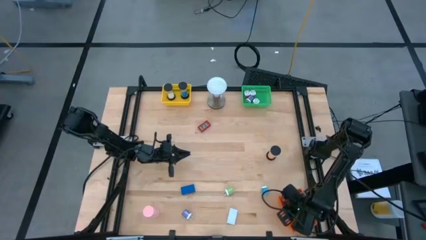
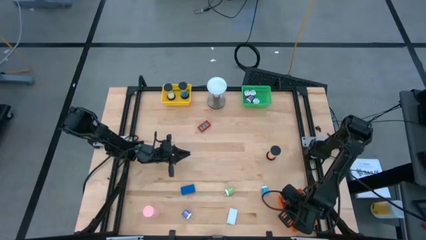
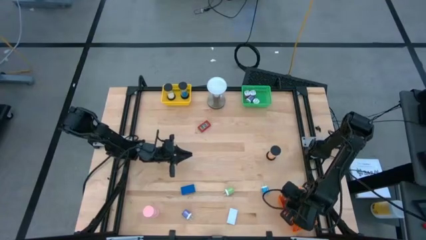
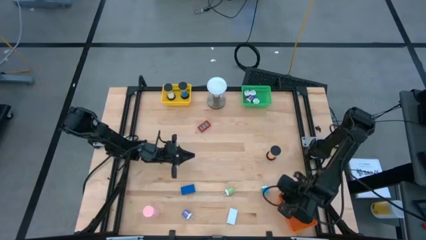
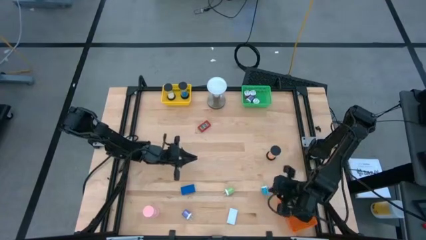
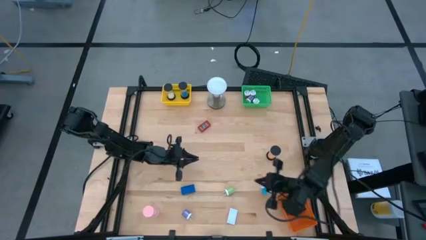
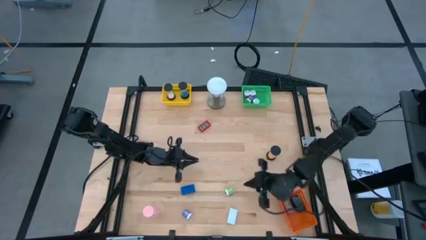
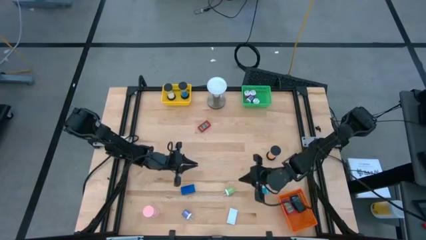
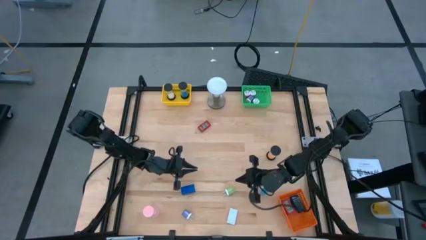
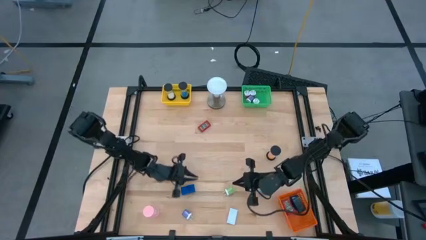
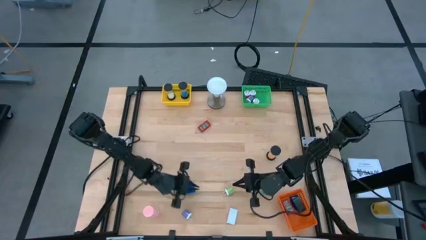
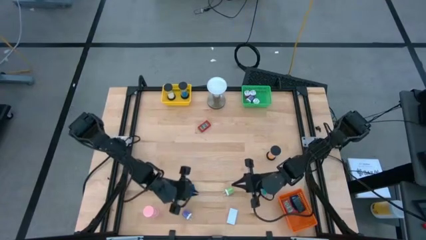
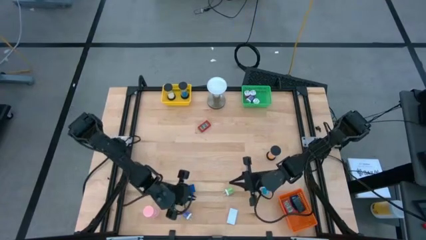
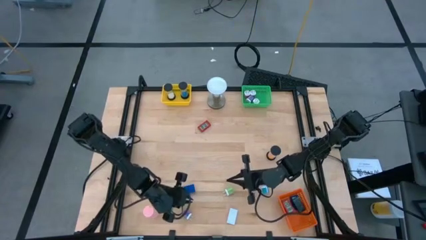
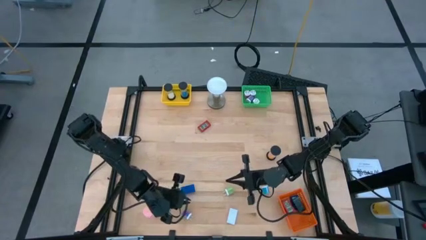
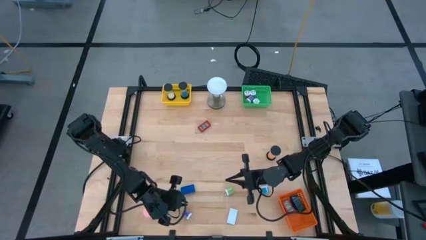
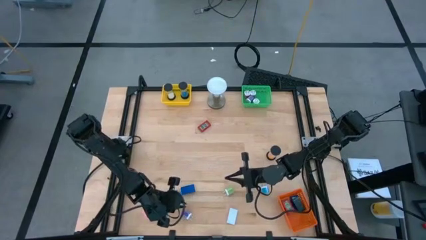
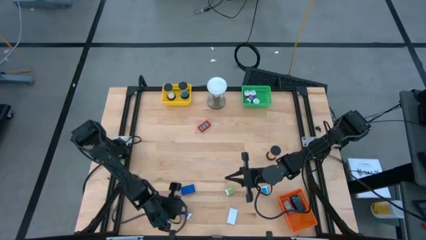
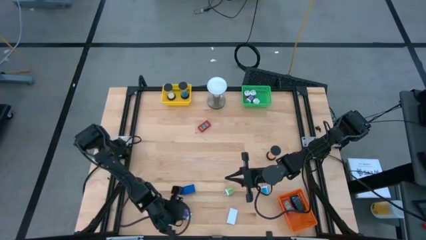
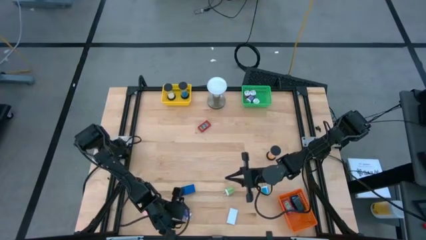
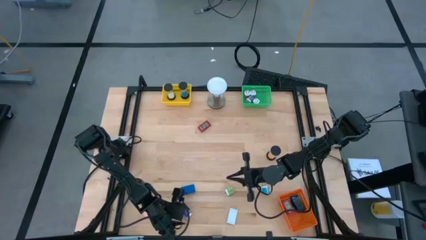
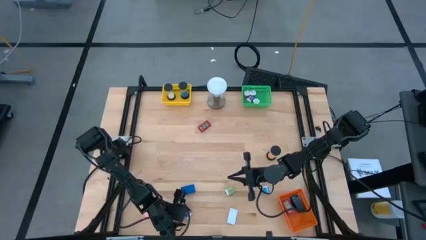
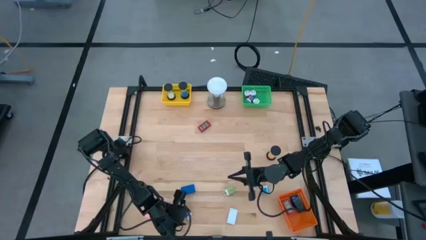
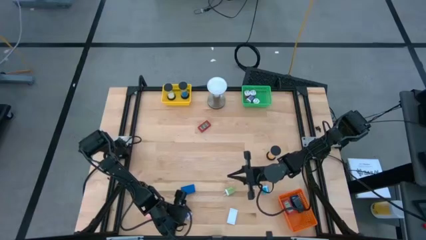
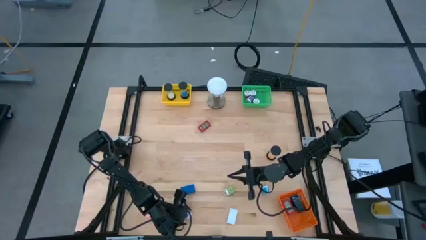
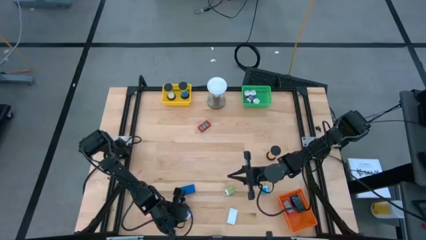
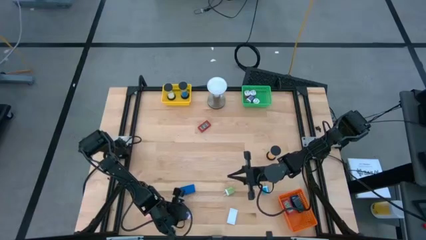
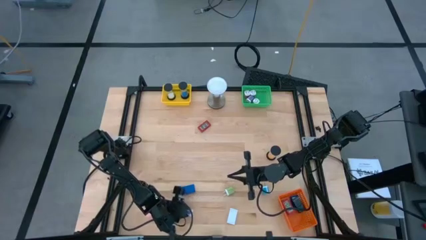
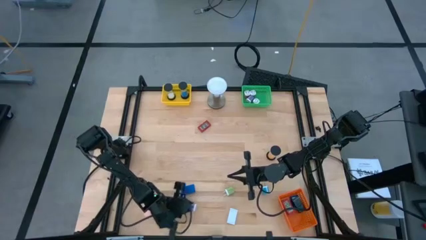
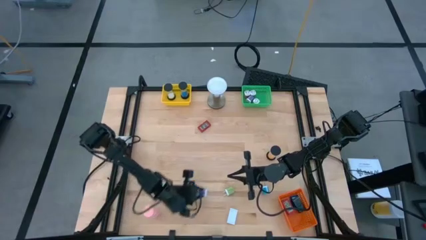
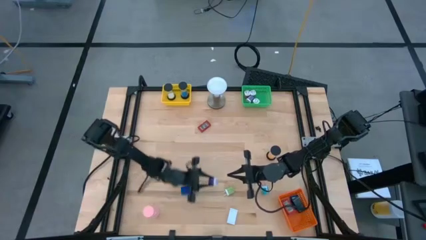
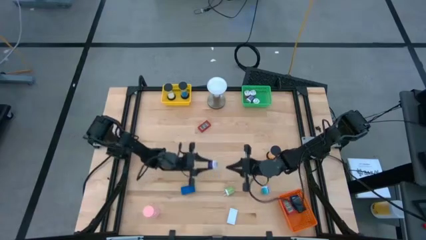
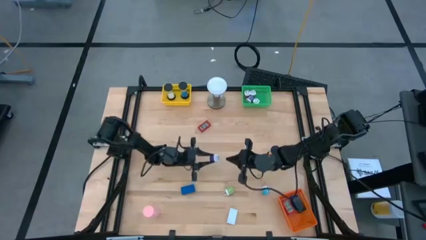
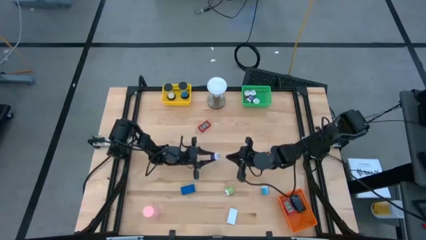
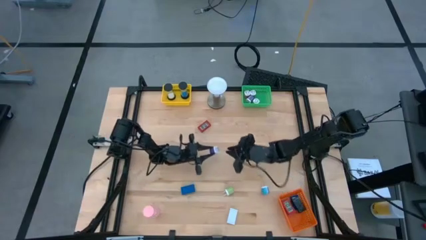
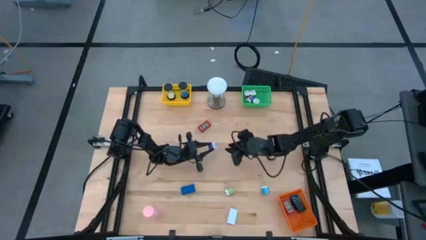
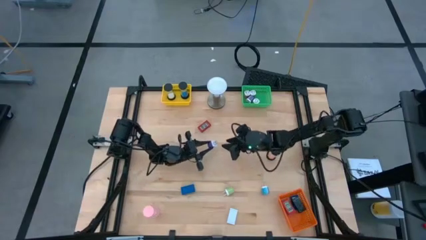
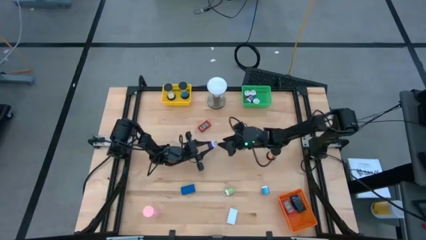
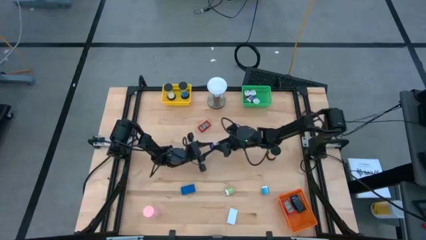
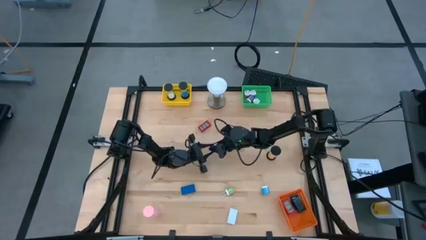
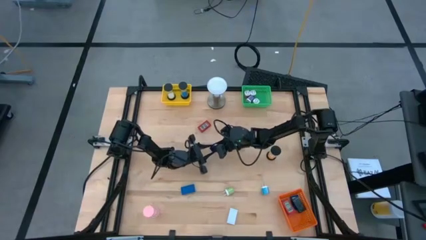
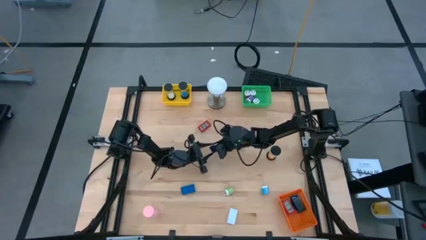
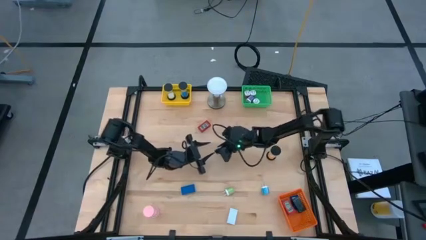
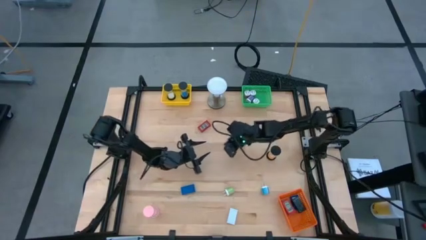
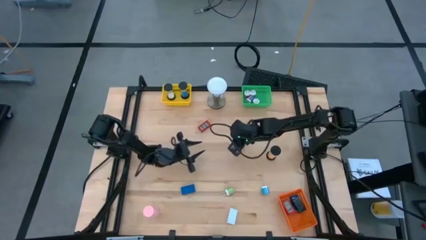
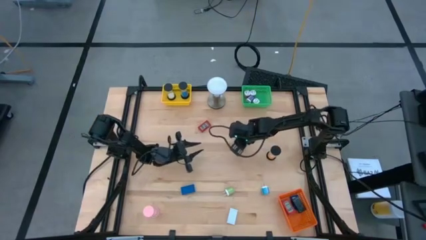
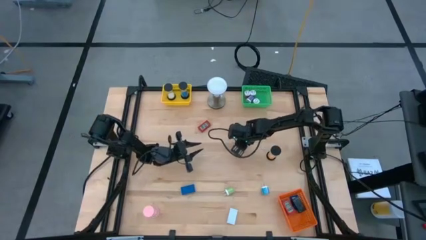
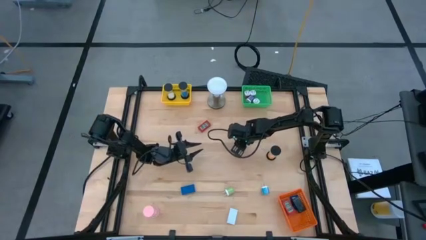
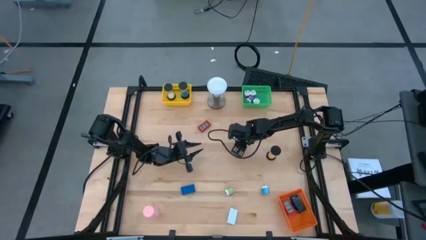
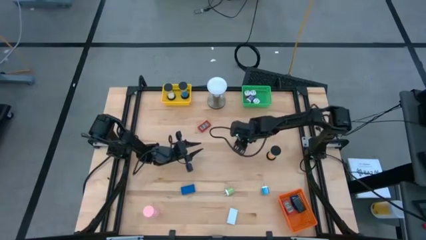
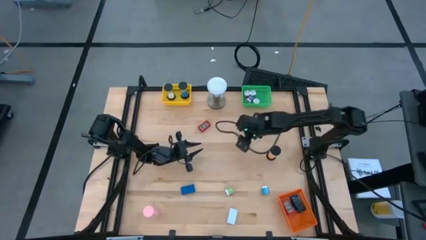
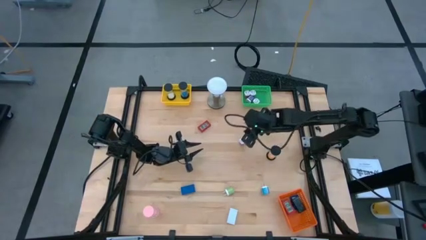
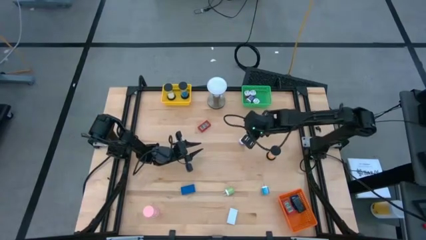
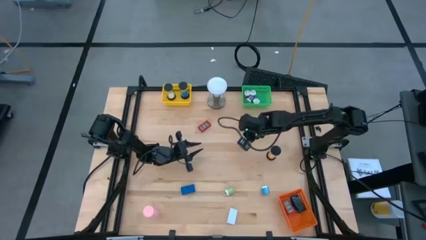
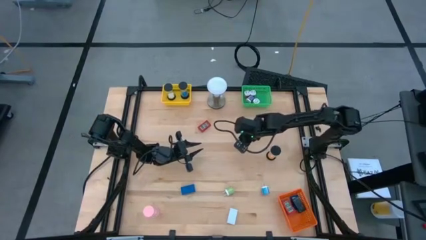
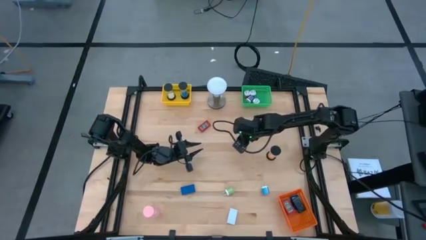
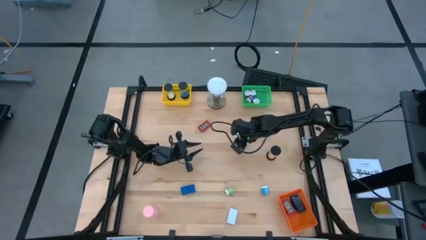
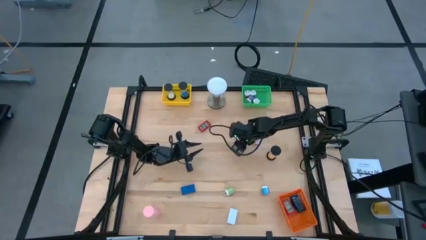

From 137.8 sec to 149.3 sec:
Task: Pick & Place Office items
Put the purple charger adapter into the green bin

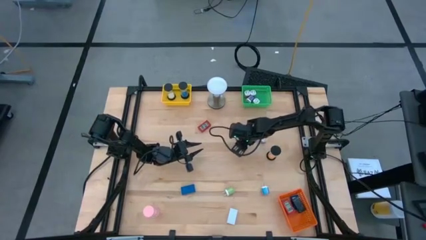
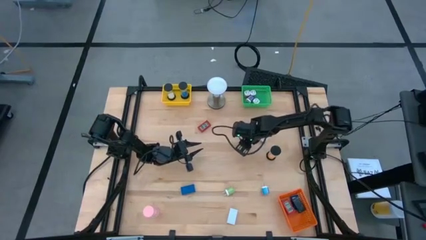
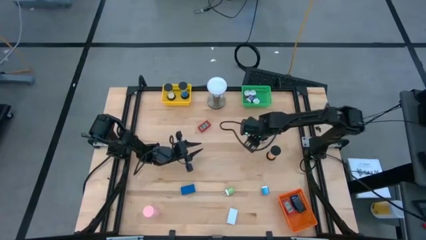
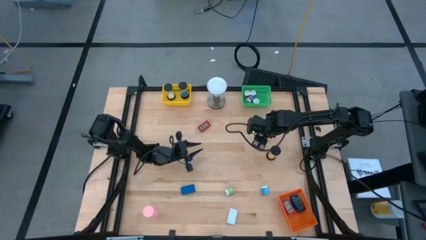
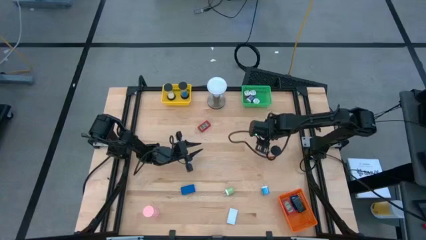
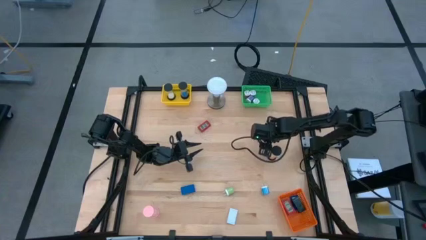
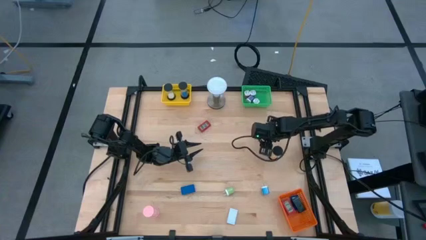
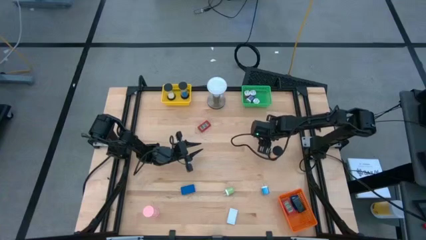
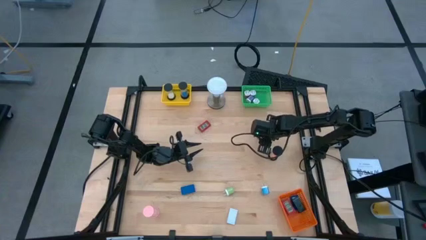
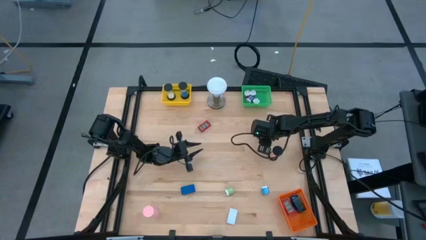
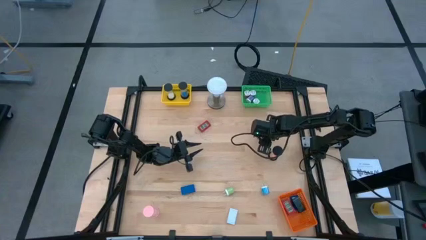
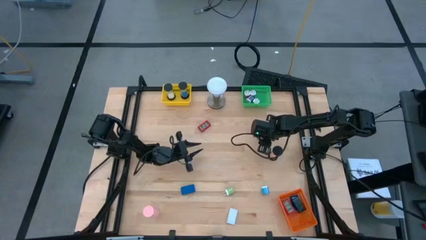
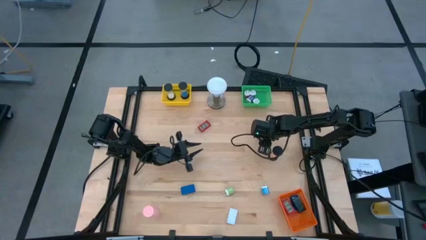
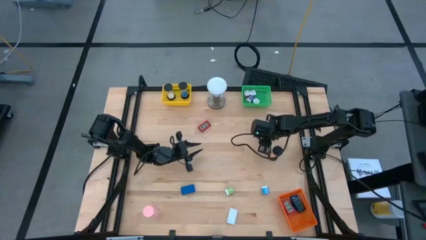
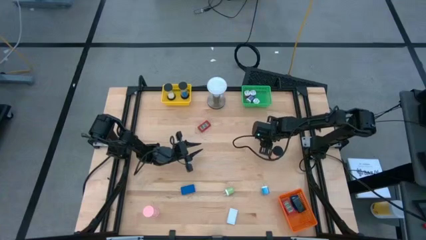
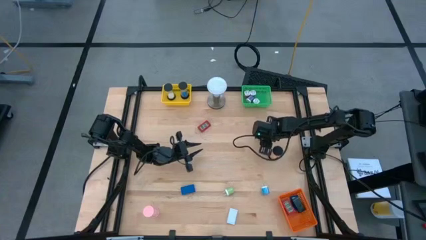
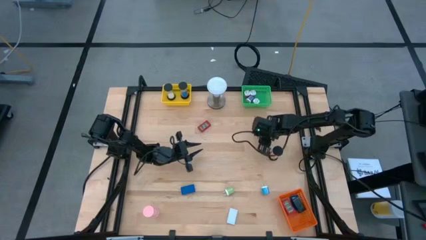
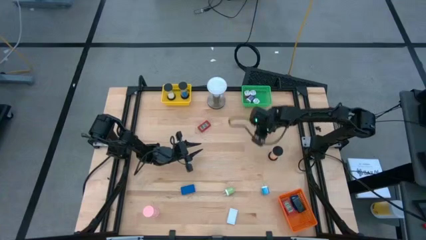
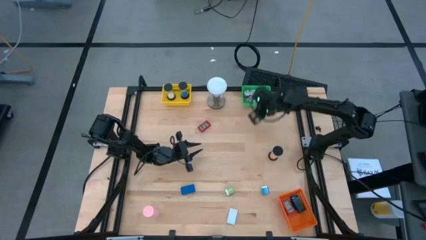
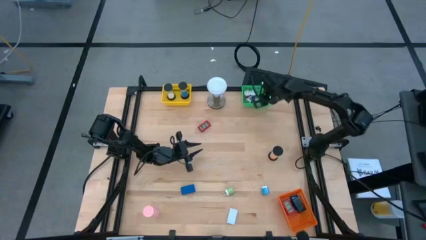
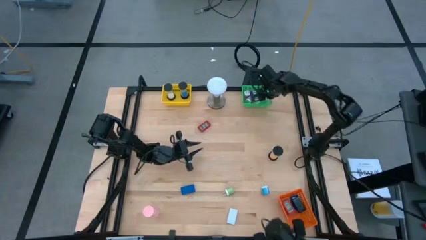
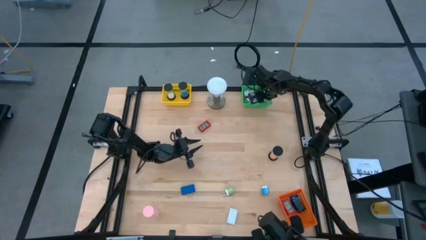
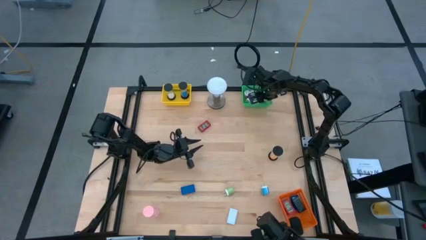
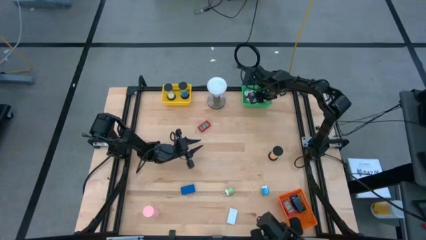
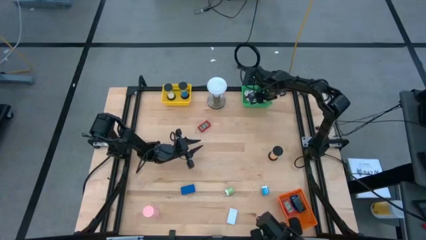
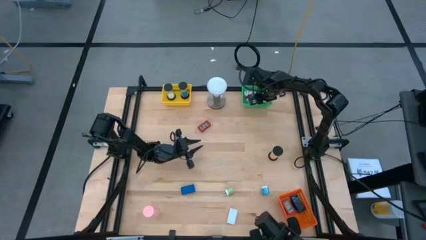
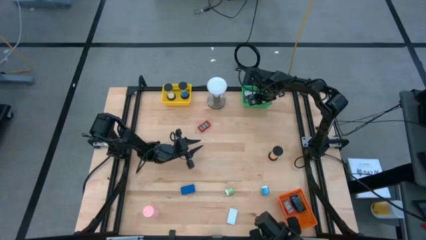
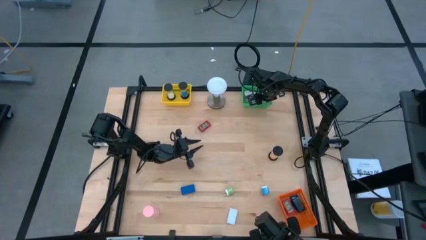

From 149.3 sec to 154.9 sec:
Put the purple charger adapter into the green bin
